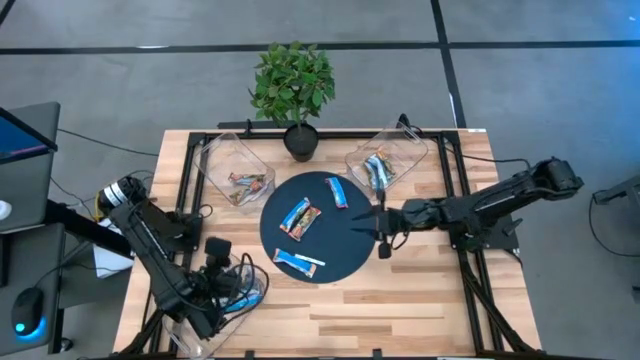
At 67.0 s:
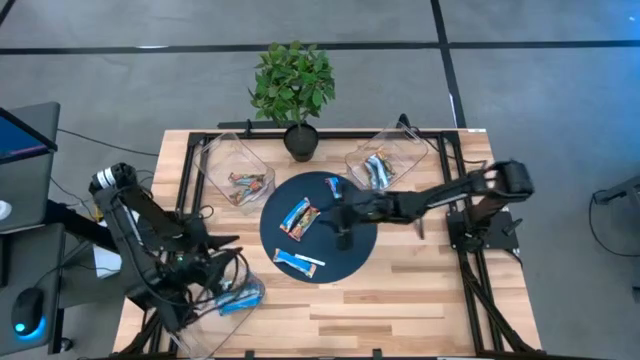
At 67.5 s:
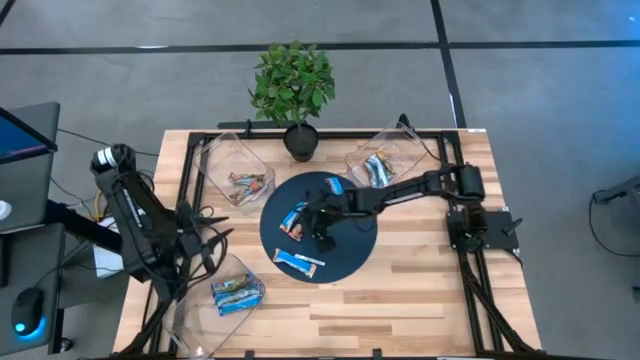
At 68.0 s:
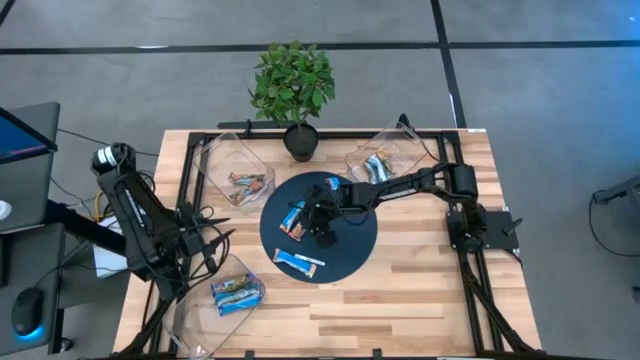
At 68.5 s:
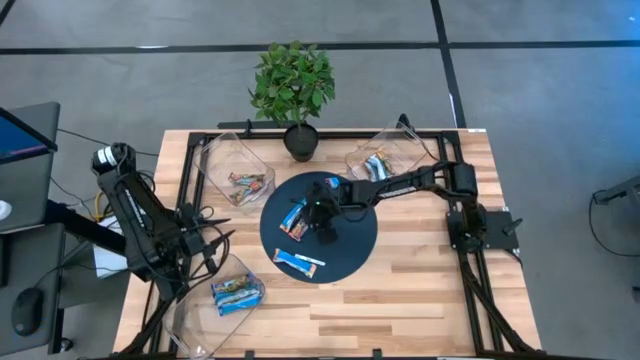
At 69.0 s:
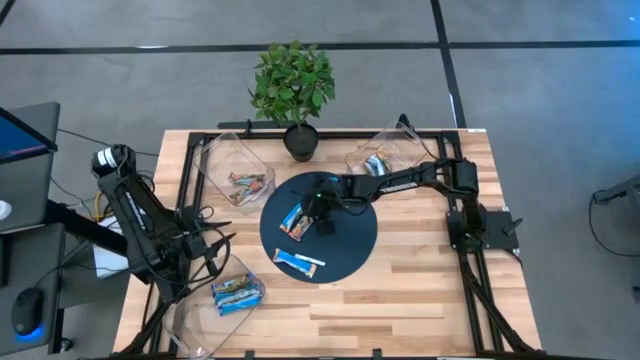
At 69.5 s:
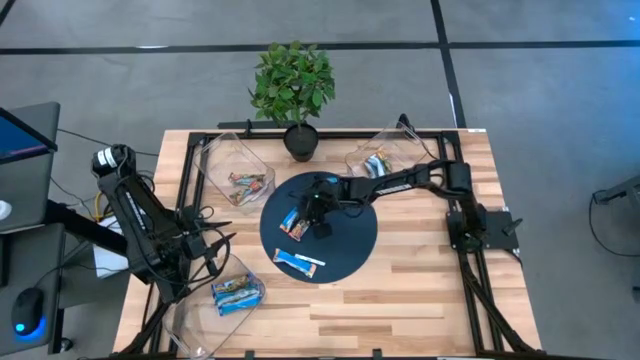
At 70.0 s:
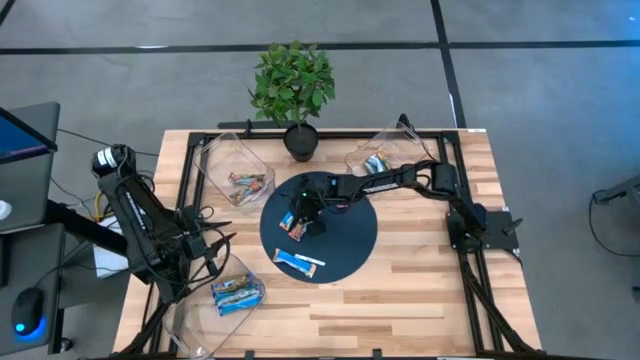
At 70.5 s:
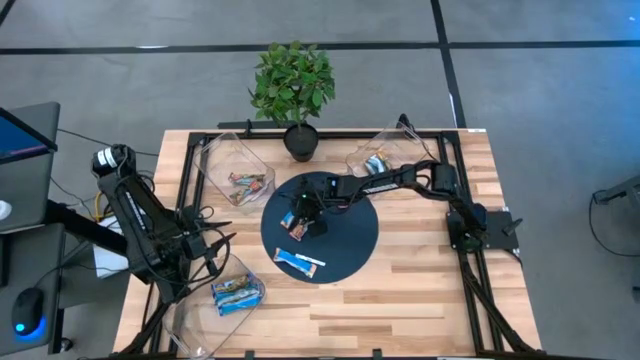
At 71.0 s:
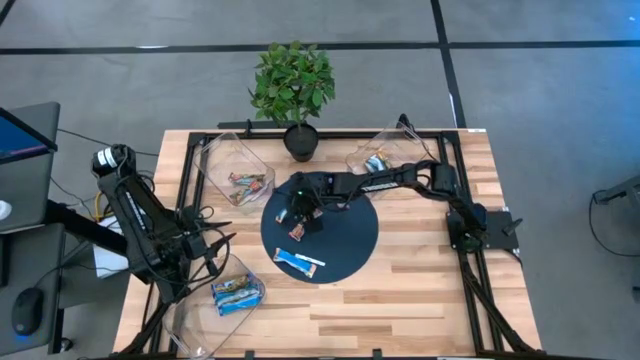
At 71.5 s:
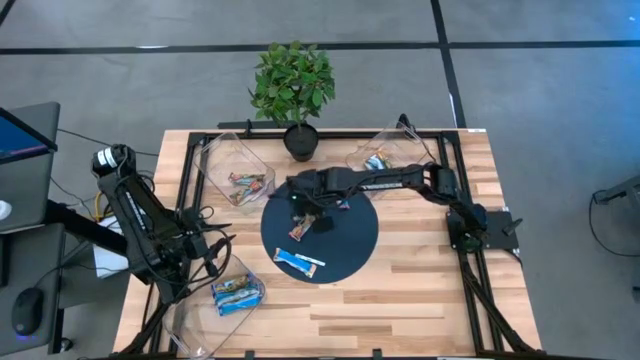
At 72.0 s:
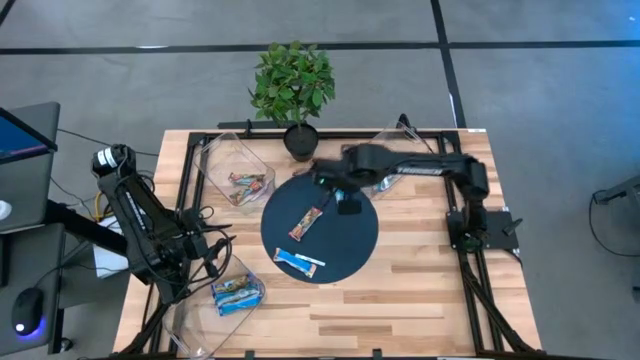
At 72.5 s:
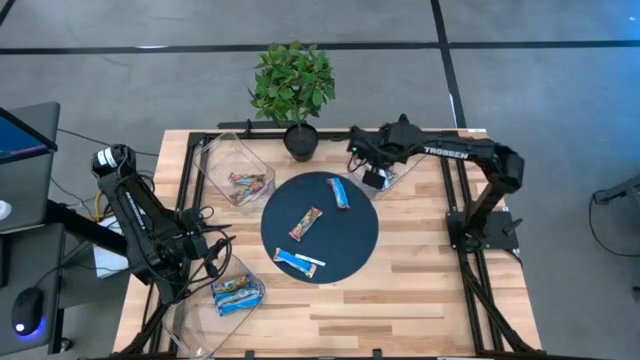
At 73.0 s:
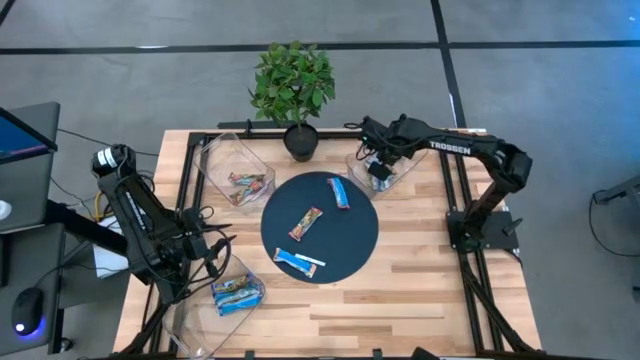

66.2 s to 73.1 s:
Task: Pick and place Granola Bars by type
Put the yellow granola bar into the top right bin

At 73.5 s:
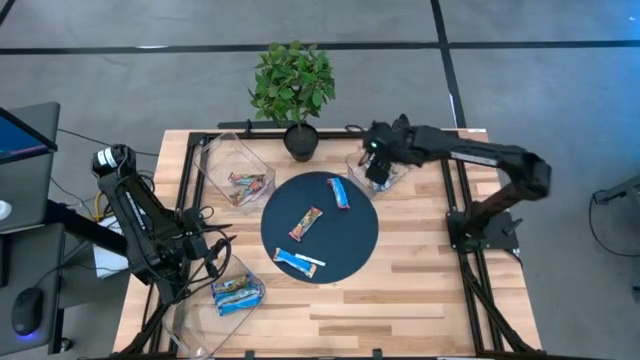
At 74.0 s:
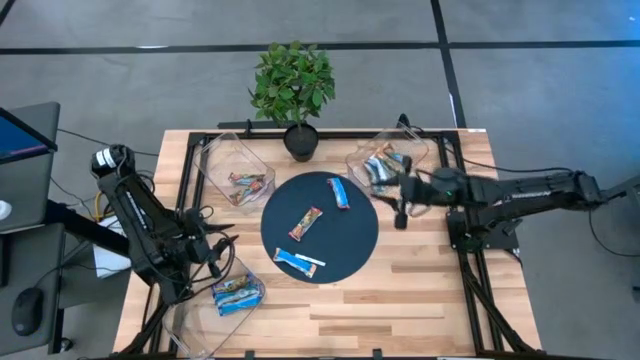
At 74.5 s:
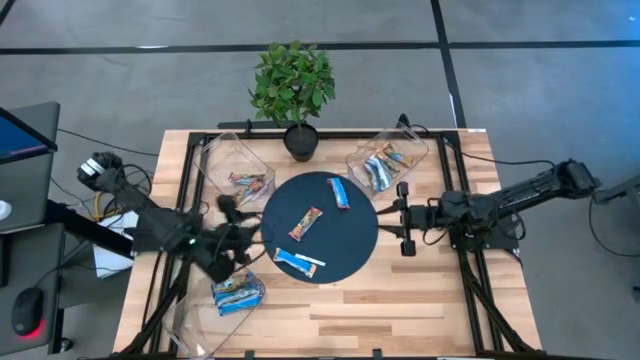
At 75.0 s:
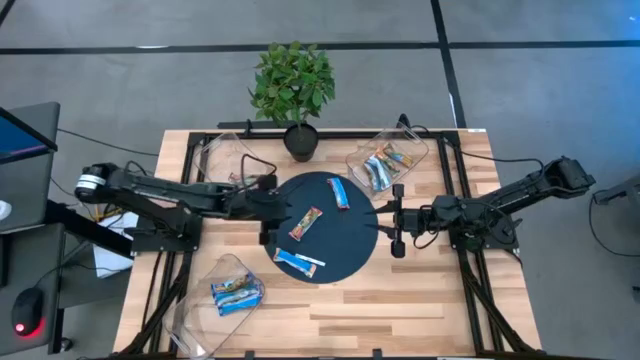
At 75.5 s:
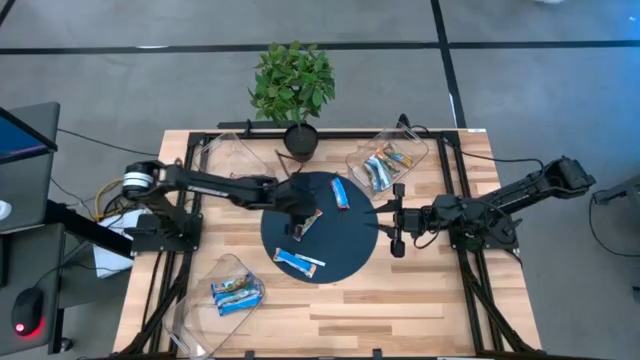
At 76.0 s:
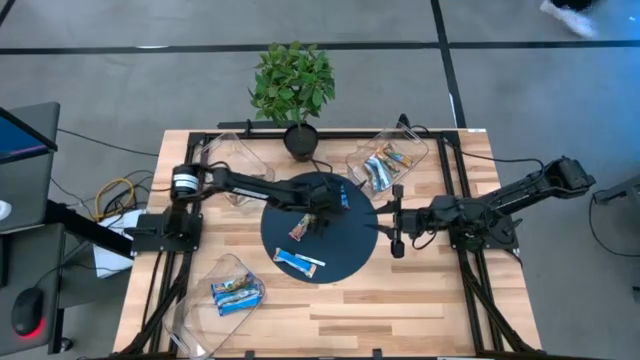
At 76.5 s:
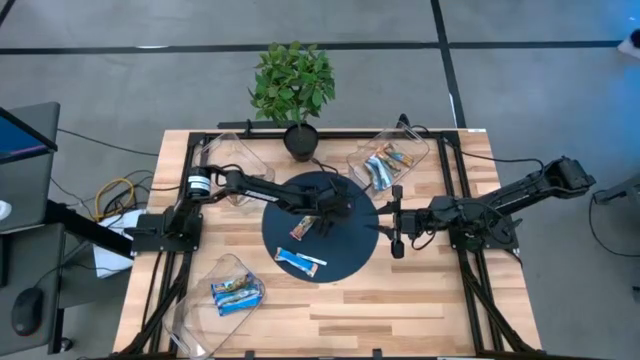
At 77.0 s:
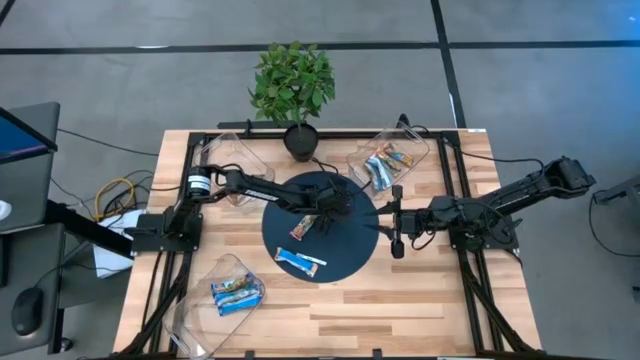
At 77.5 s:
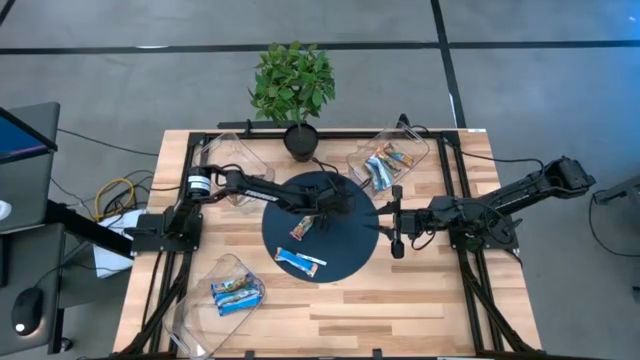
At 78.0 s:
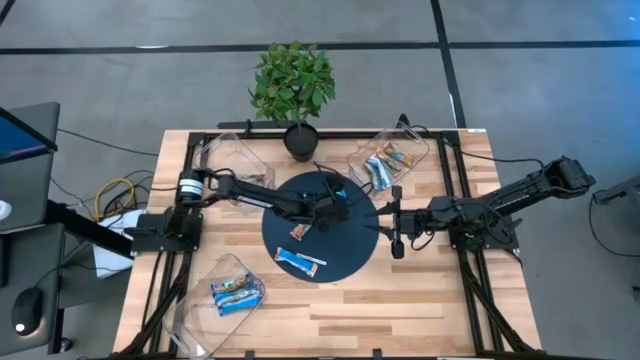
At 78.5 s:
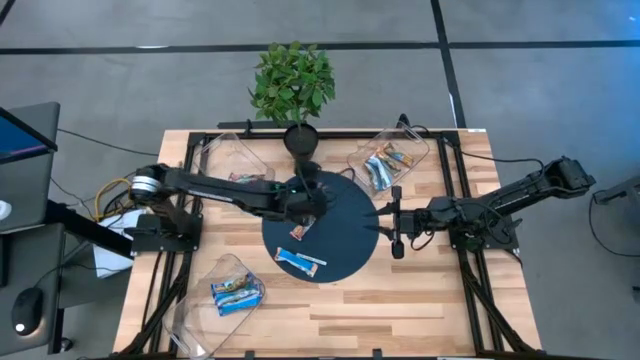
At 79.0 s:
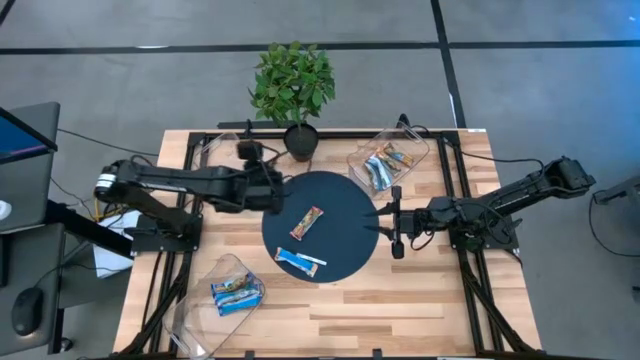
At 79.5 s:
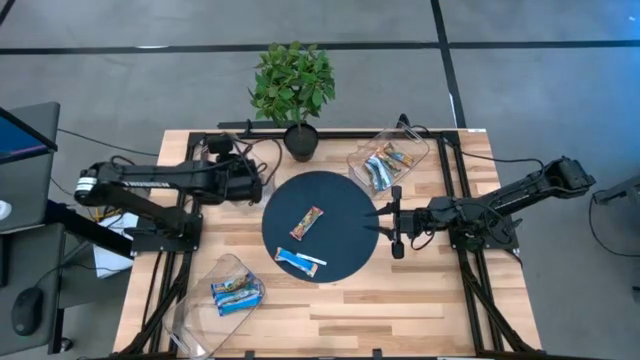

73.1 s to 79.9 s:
Put the red granola bar into the top left bin

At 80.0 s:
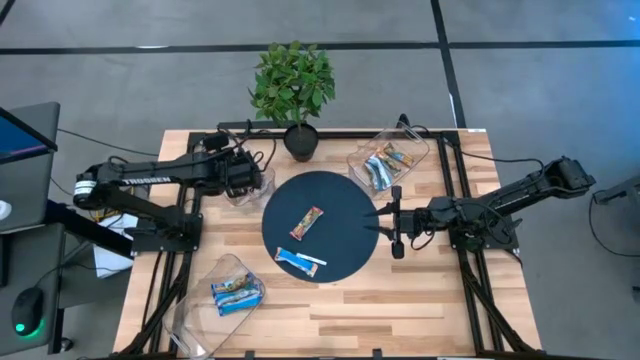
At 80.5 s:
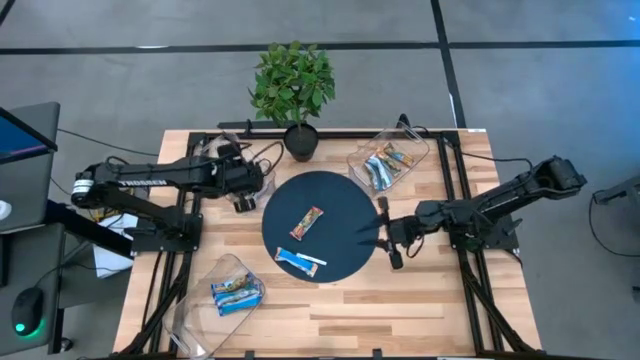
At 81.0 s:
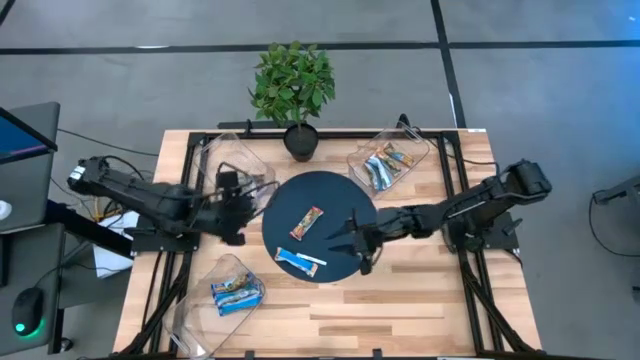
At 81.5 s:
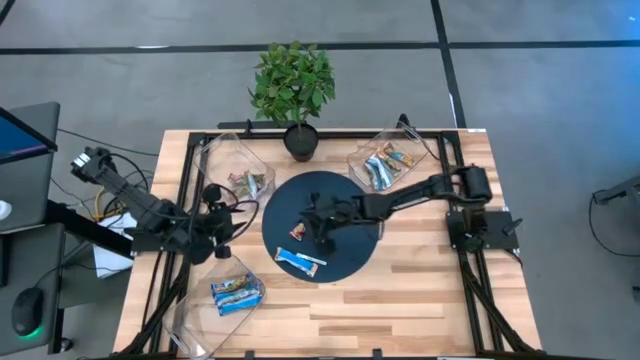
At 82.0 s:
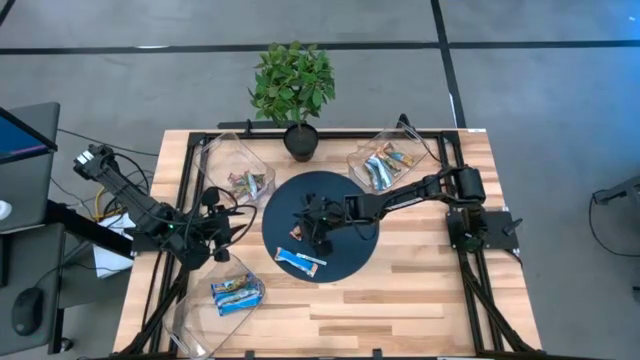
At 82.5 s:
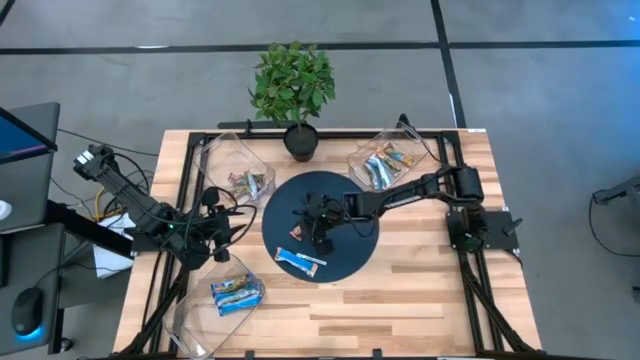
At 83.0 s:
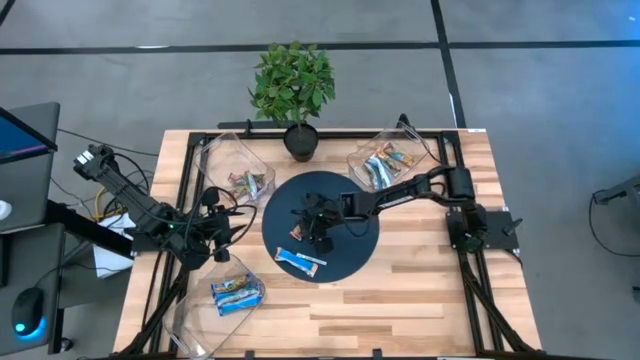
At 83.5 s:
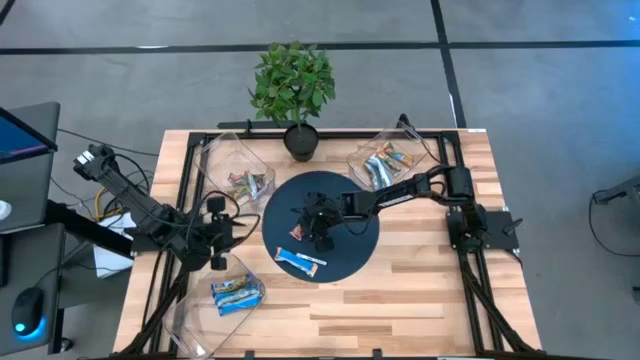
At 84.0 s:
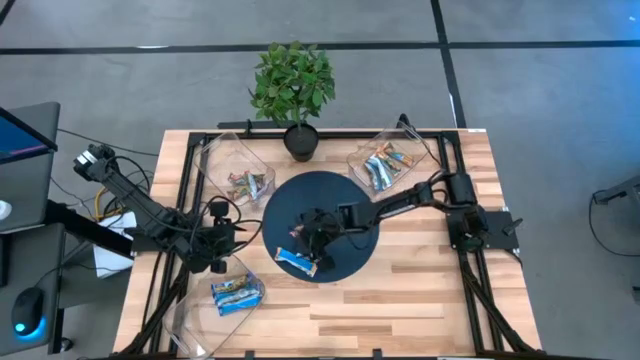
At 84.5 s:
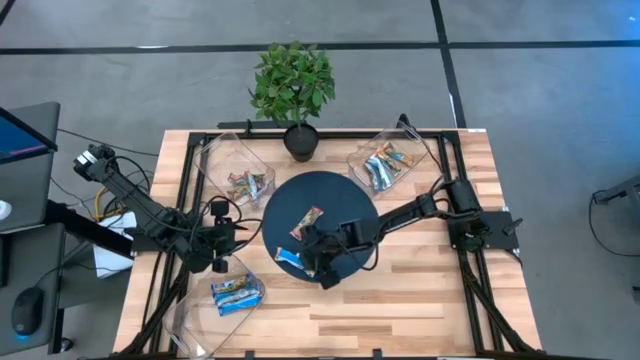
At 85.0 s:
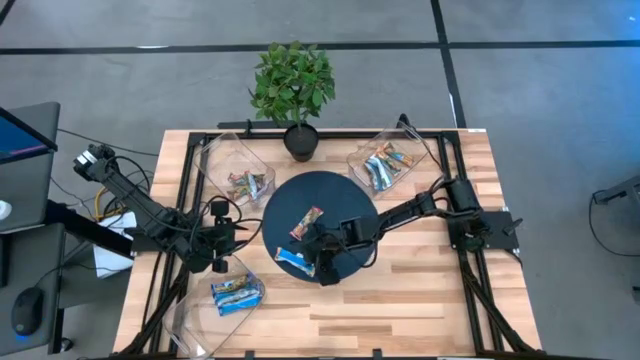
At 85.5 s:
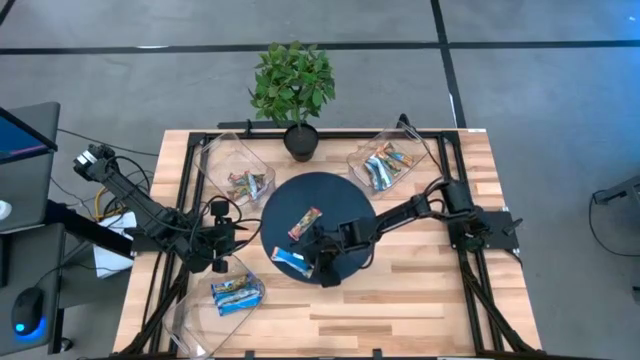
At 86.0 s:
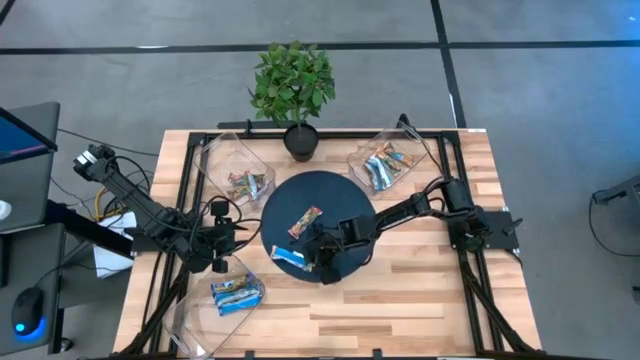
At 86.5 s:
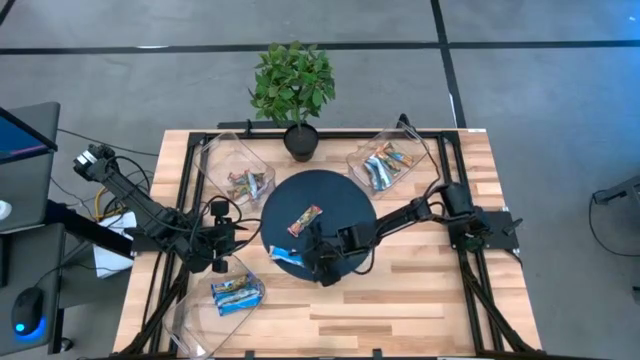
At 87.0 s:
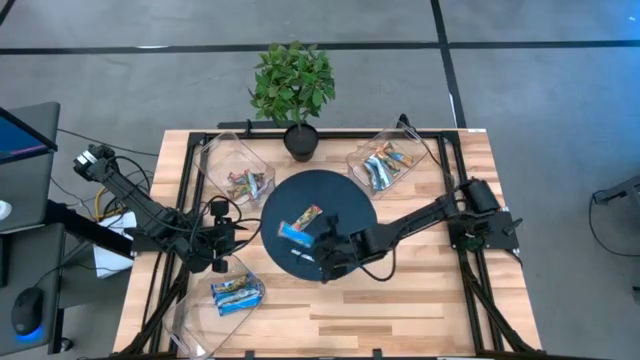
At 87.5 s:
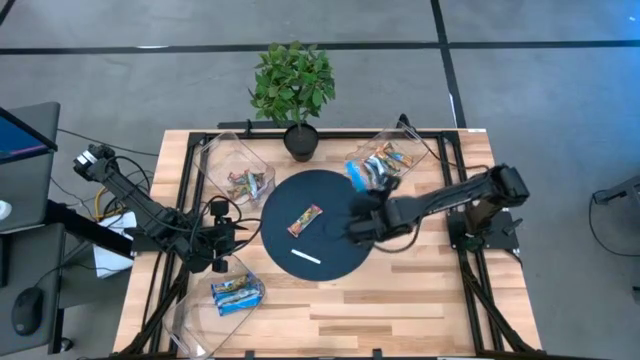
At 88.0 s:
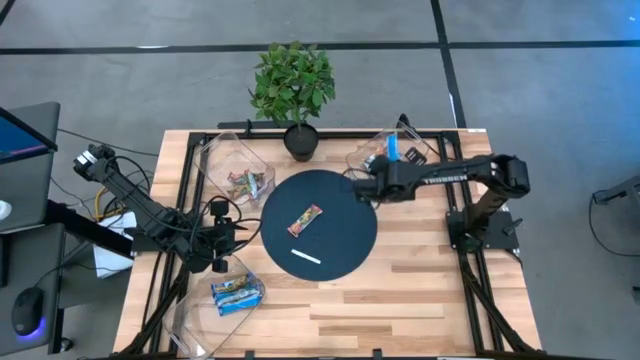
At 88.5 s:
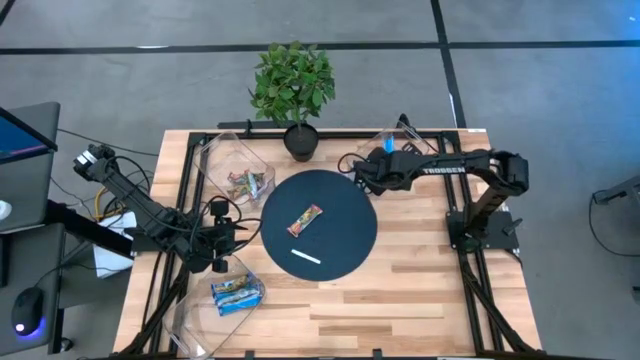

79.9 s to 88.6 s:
Put the yellow granola bar into the top right bin
